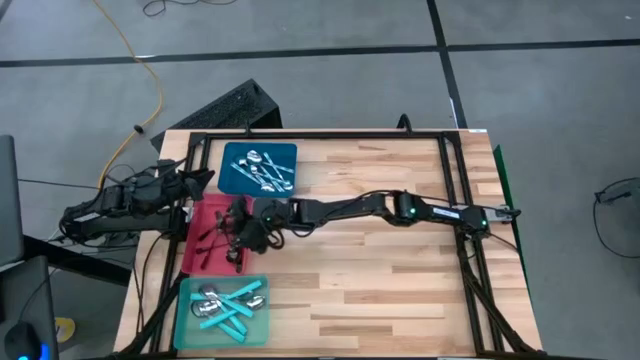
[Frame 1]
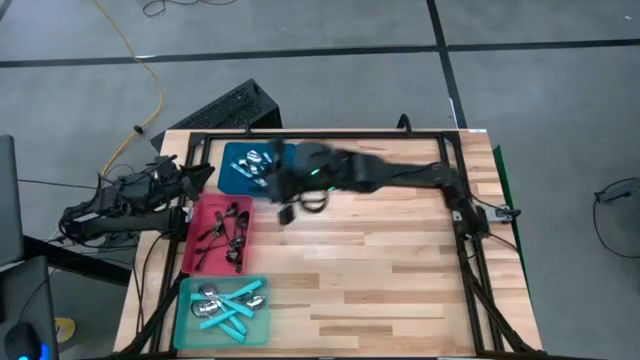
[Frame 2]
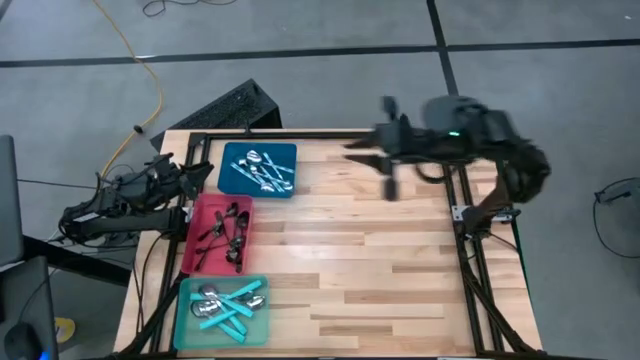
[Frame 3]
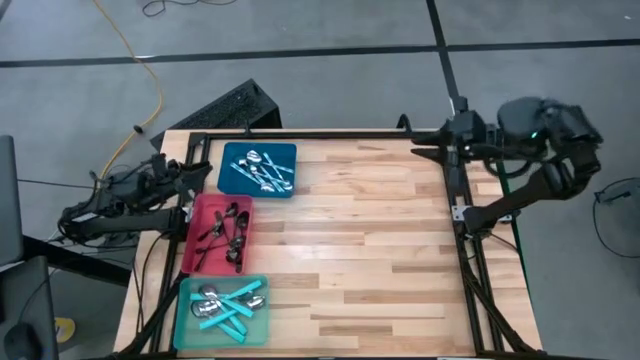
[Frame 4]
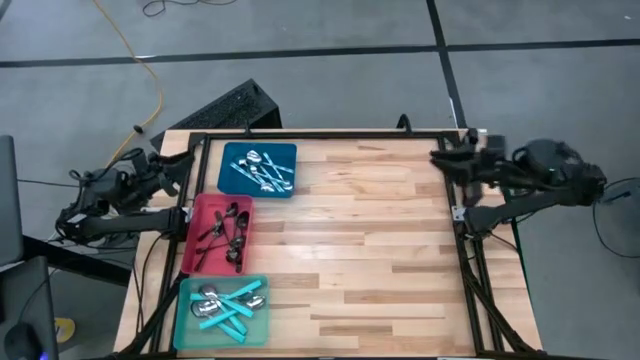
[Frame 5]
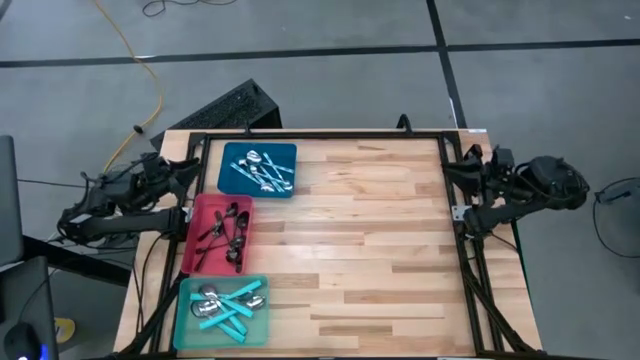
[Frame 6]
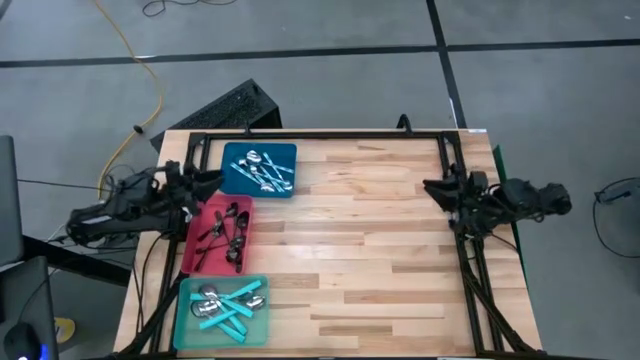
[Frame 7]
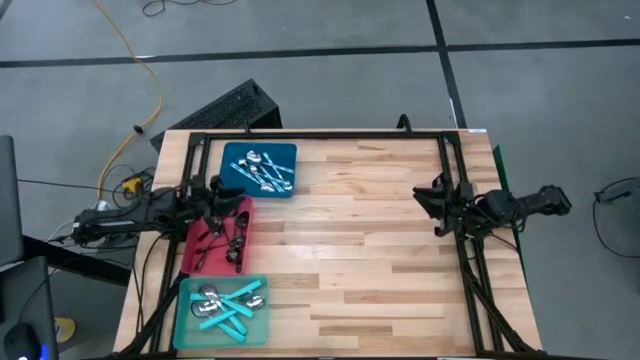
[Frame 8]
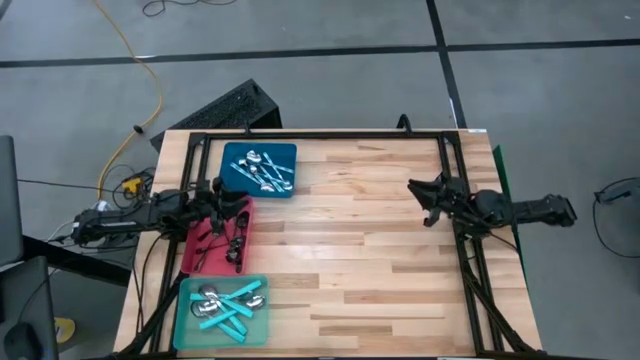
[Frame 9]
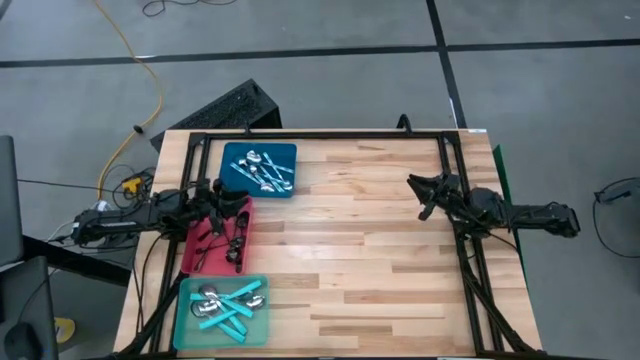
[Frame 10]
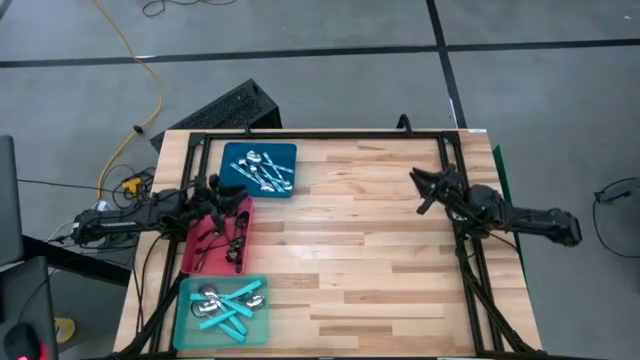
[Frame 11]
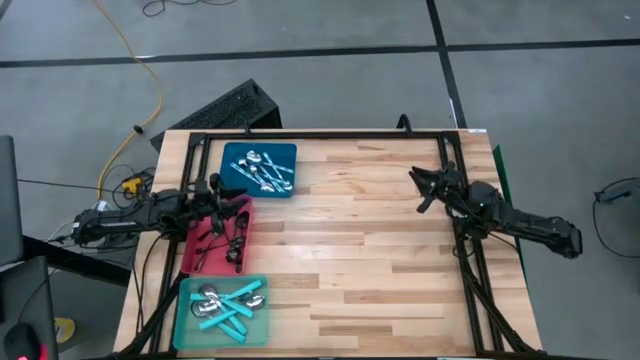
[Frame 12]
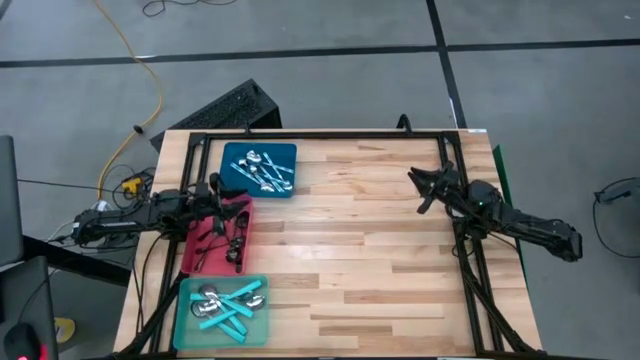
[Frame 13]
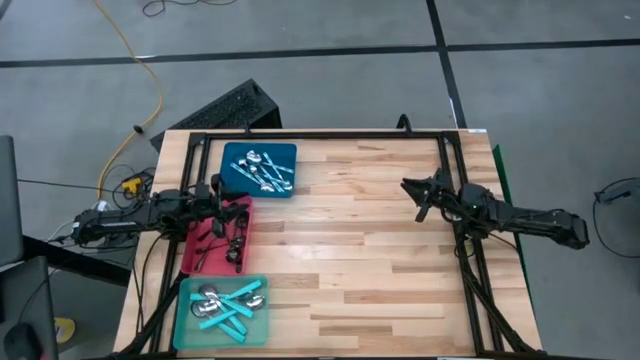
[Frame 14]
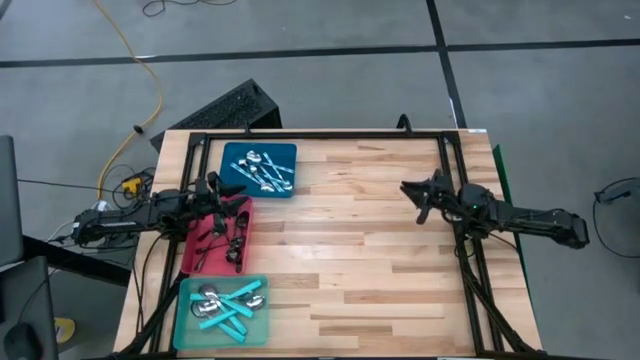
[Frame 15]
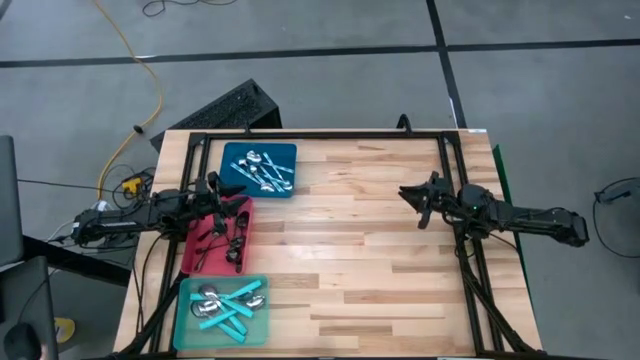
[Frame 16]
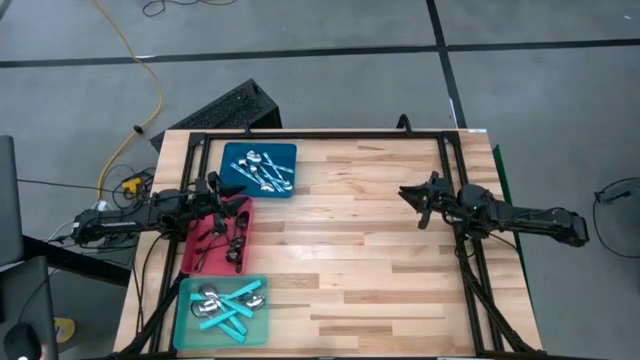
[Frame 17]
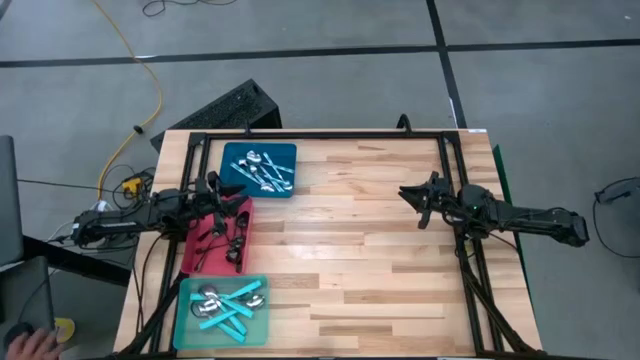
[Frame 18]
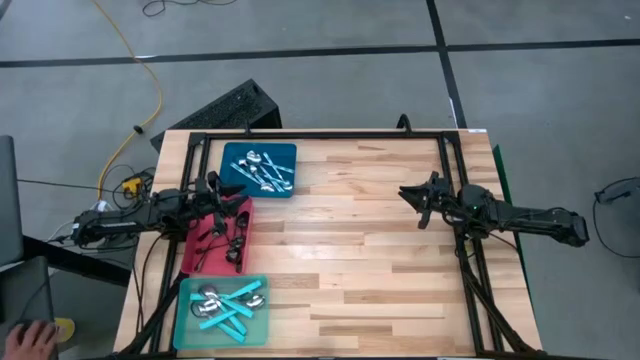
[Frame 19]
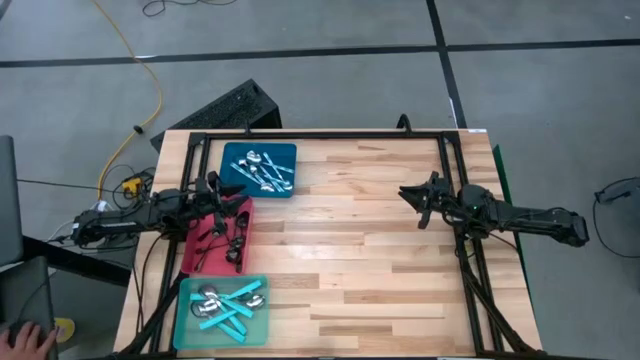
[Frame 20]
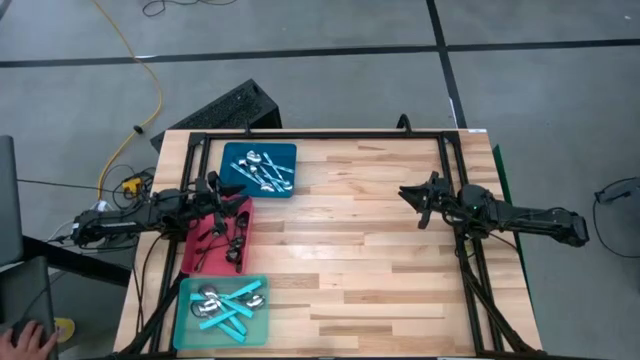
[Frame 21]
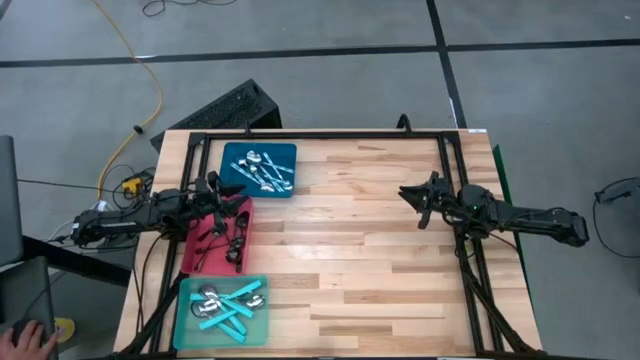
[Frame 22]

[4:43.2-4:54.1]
Task: Sort silverware by color (type)
Return to Home Position

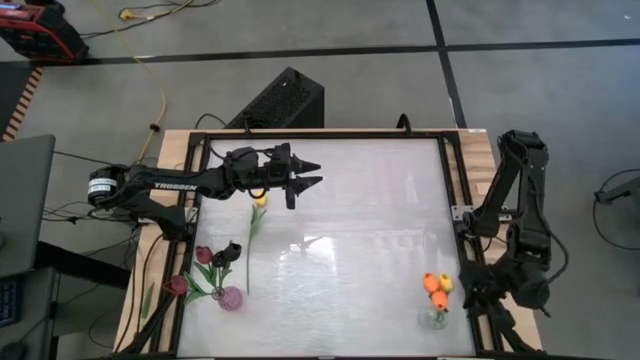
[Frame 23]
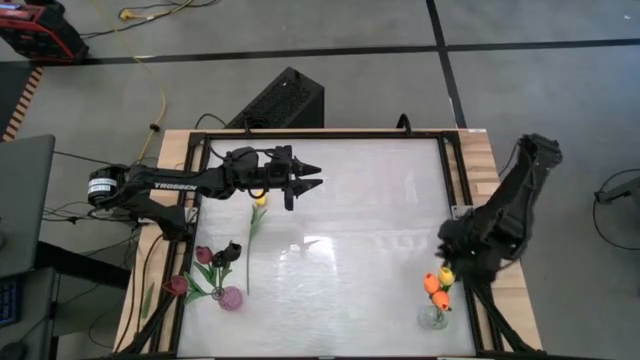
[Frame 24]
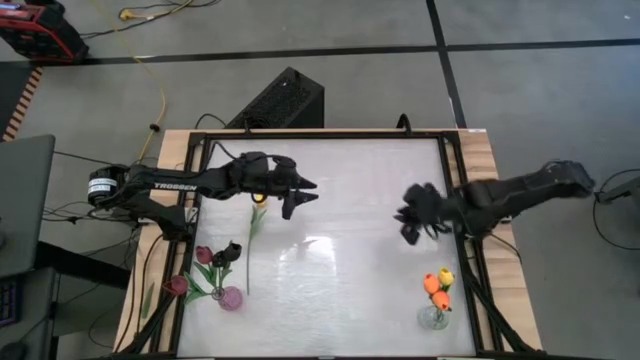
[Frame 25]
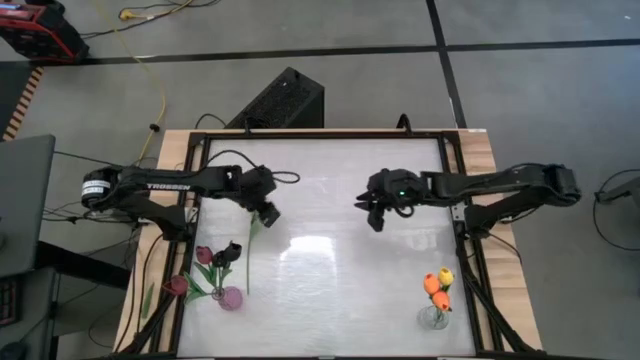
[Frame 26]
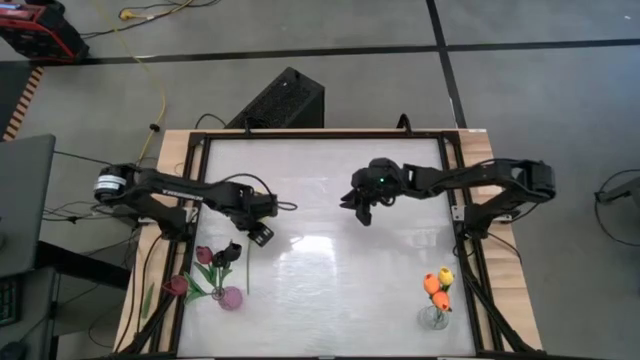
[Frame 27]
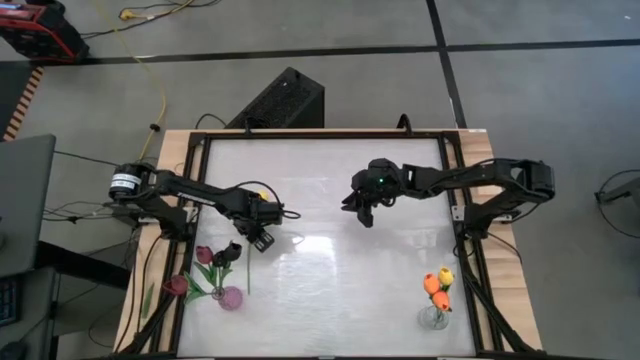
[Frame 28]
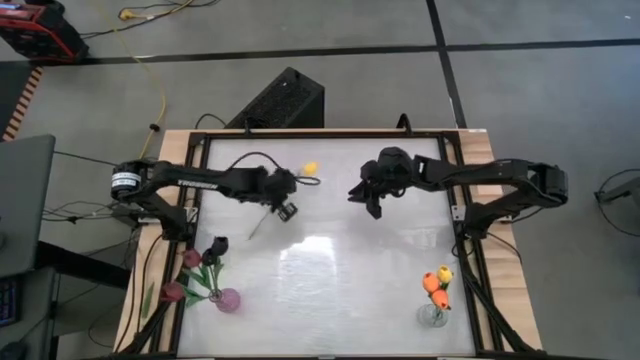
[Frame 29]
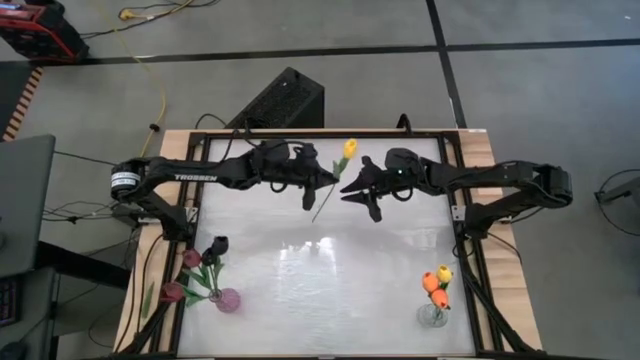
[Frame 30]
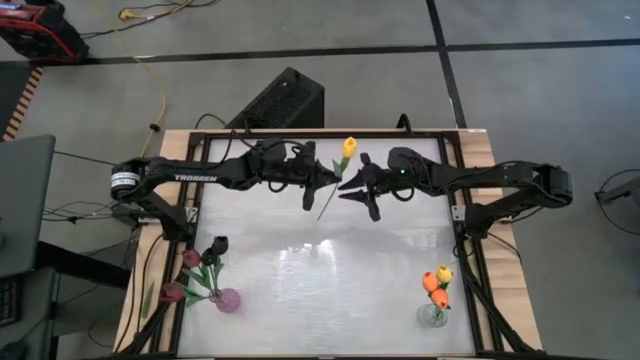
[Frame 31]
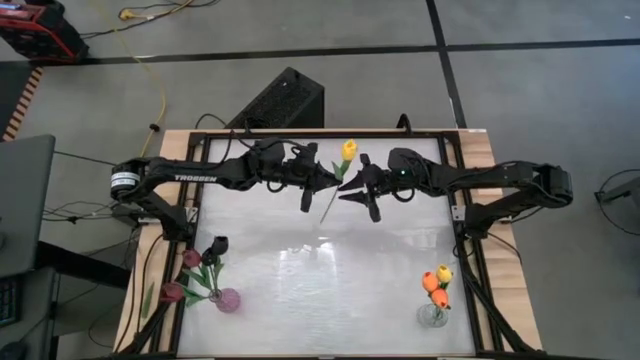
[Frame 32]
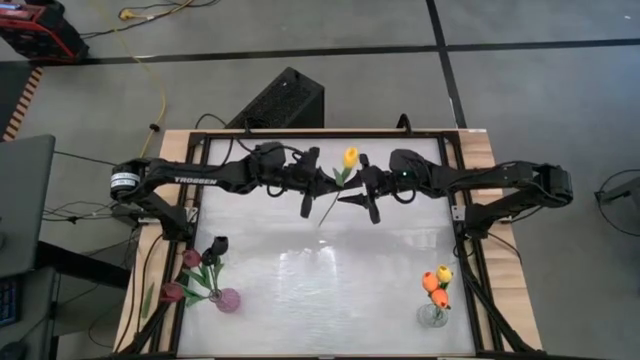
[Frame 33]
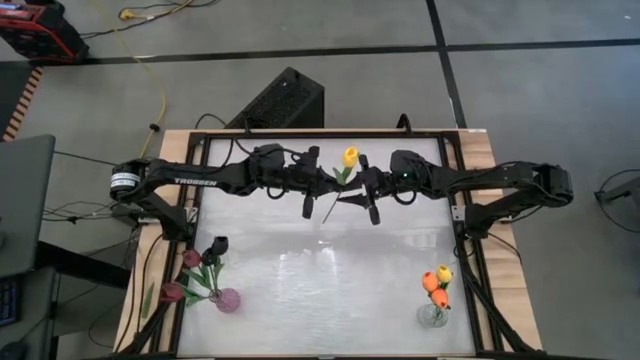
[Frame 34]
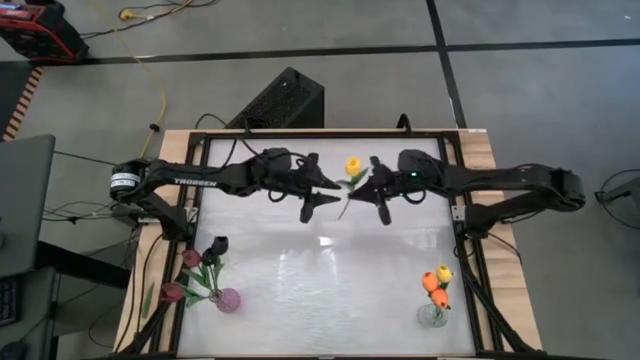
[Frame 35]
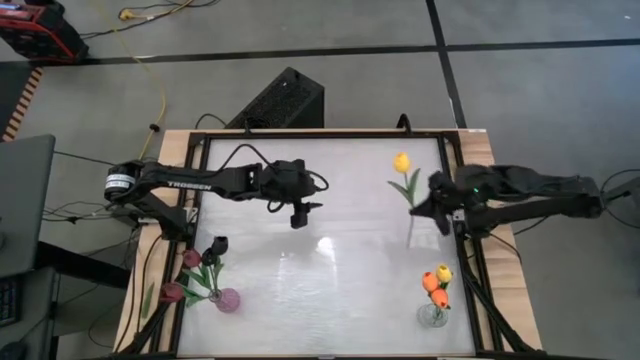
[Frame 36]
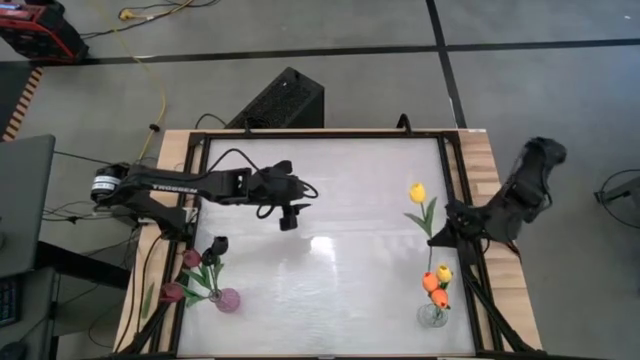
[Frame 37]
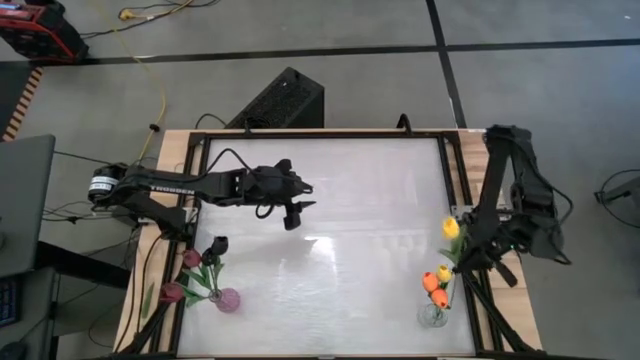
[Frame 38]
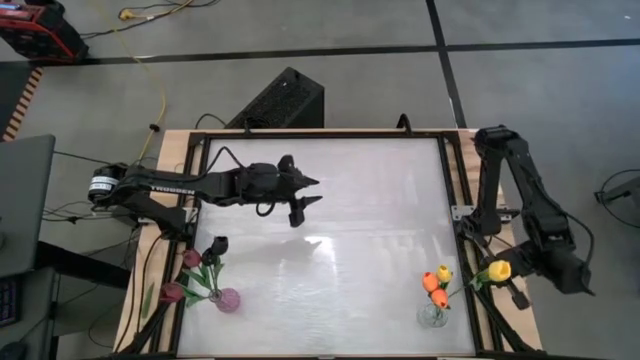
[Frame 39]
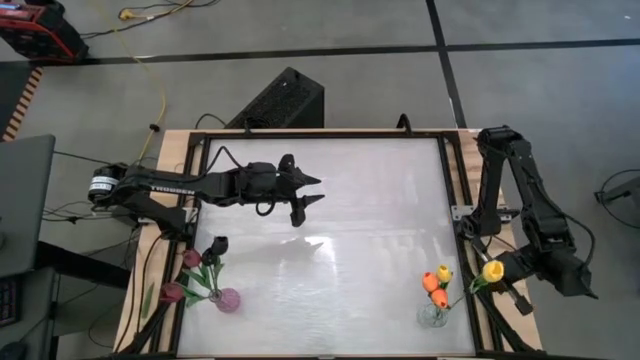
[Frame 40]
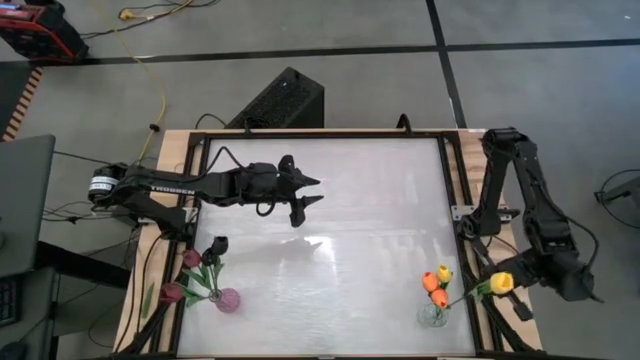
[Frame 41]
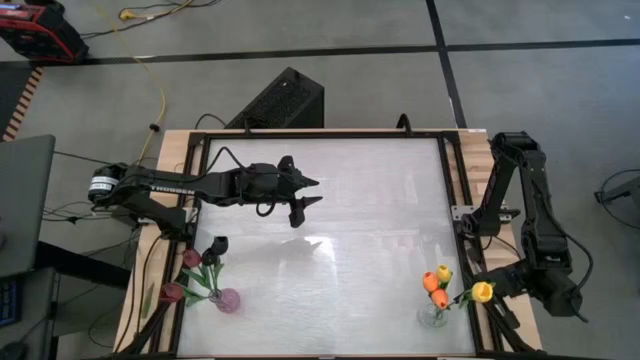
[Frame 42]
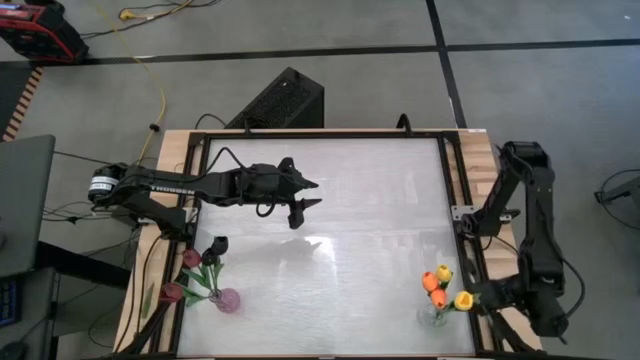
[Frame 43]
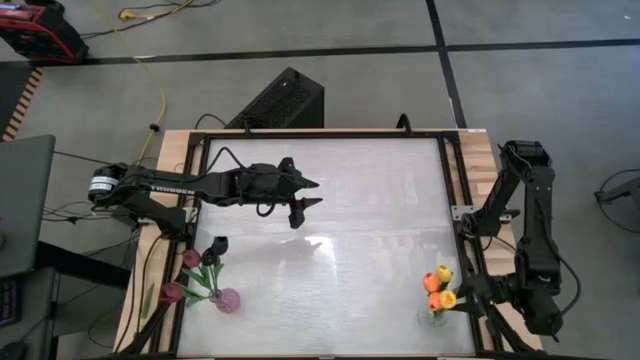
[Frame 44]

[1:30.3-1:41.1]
Task: Sort flowers into vase by color
Put the yellow flower into the transparent flower vase
